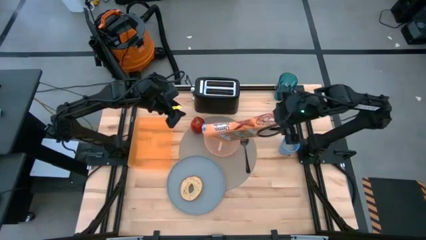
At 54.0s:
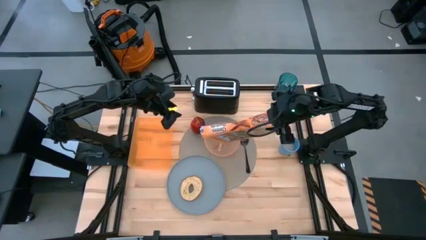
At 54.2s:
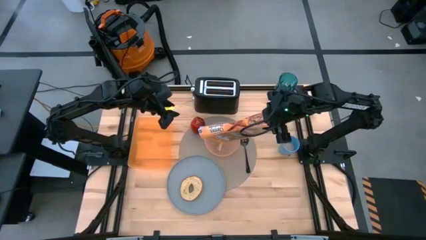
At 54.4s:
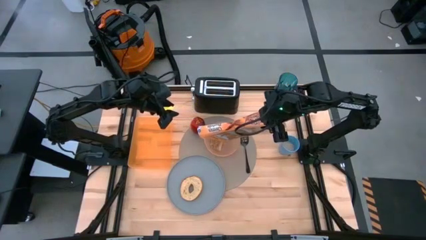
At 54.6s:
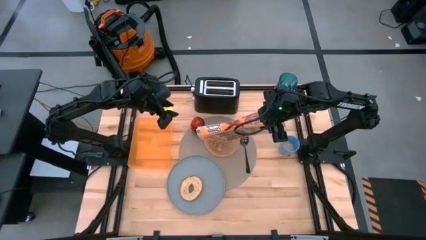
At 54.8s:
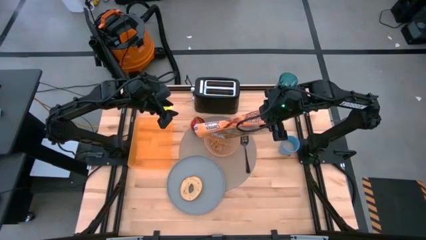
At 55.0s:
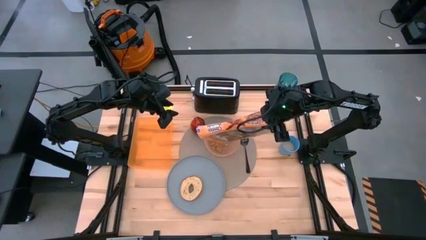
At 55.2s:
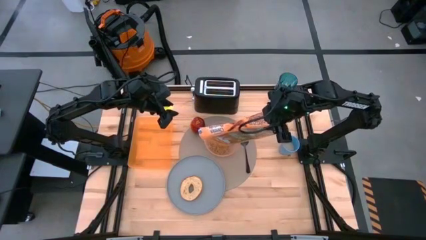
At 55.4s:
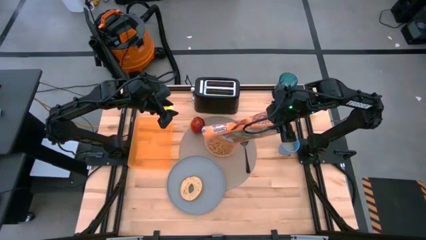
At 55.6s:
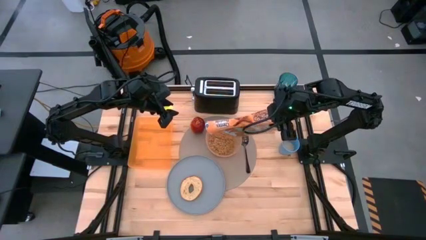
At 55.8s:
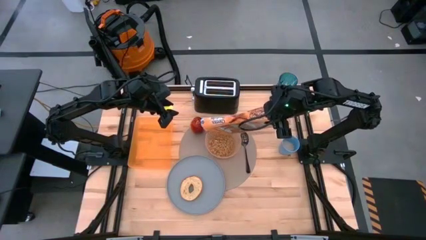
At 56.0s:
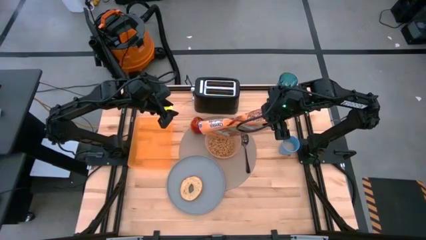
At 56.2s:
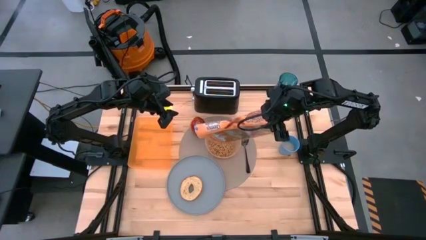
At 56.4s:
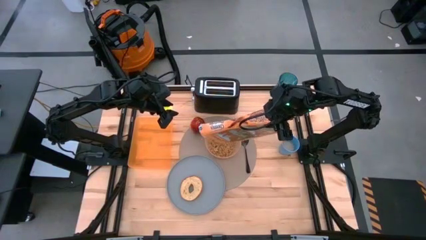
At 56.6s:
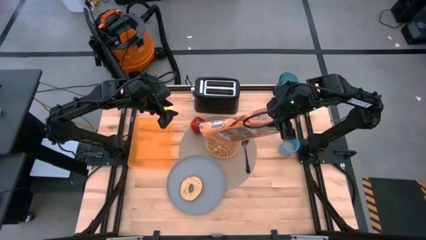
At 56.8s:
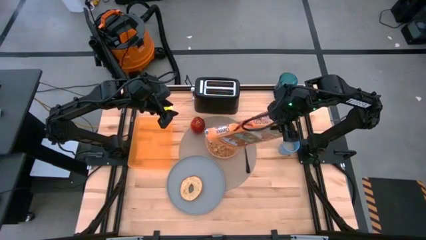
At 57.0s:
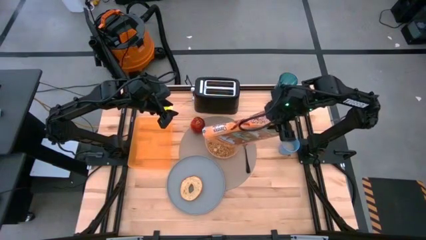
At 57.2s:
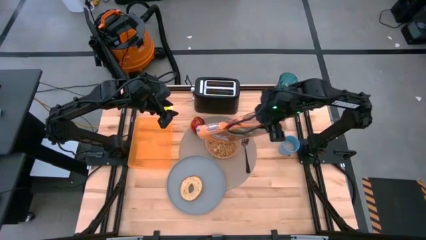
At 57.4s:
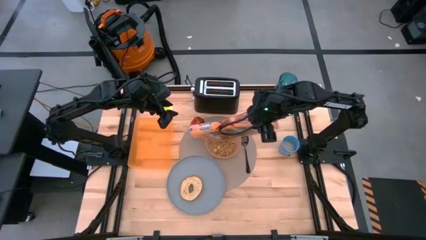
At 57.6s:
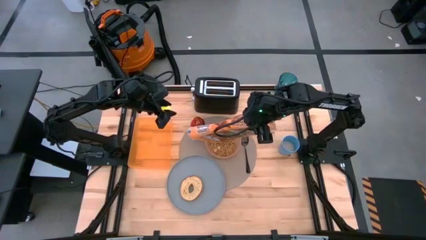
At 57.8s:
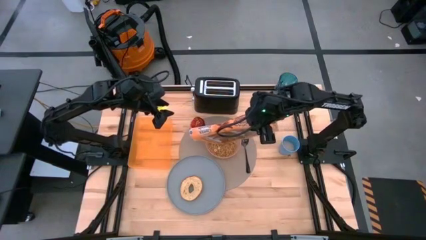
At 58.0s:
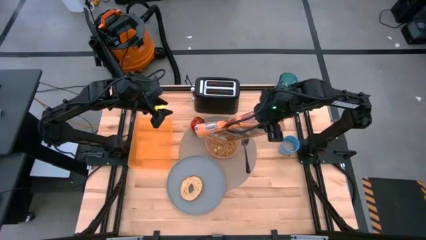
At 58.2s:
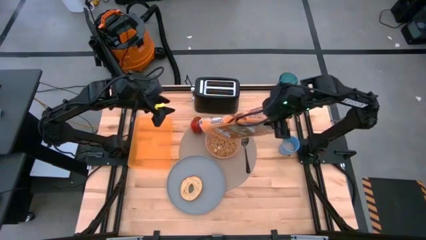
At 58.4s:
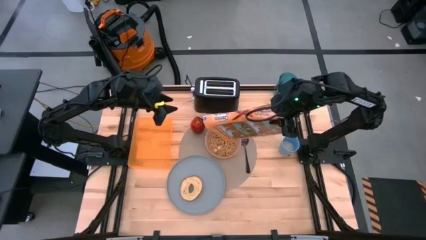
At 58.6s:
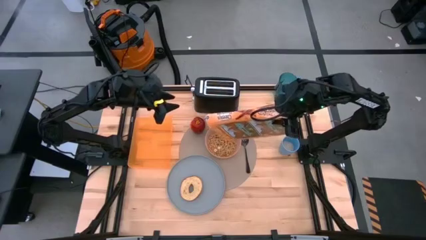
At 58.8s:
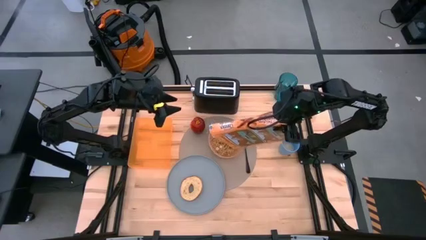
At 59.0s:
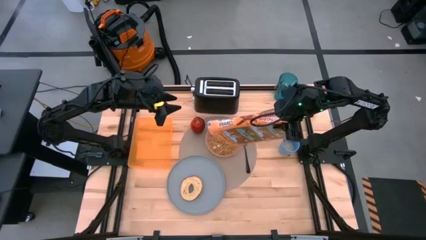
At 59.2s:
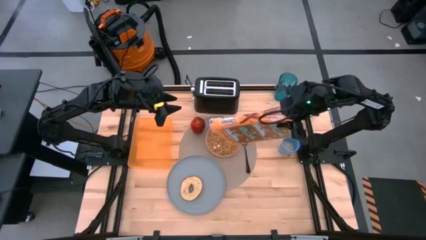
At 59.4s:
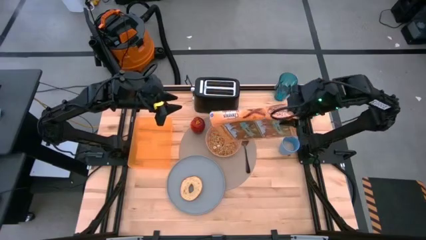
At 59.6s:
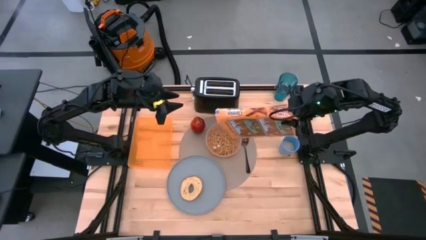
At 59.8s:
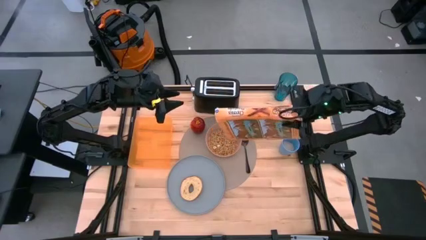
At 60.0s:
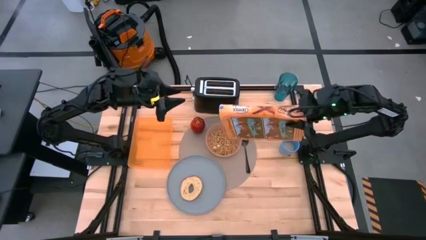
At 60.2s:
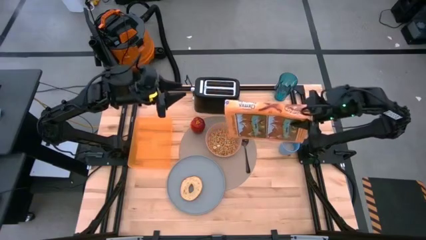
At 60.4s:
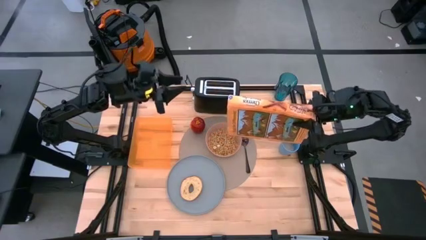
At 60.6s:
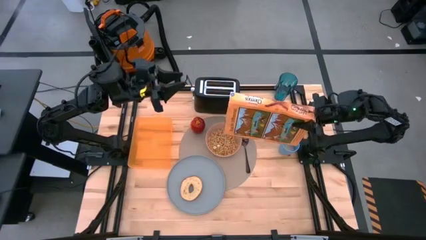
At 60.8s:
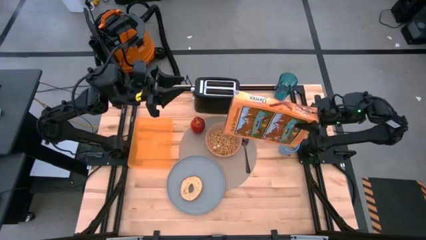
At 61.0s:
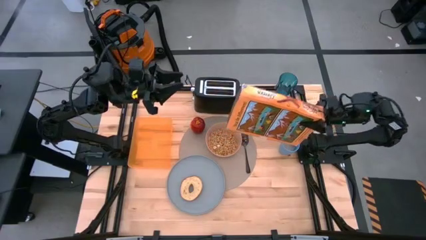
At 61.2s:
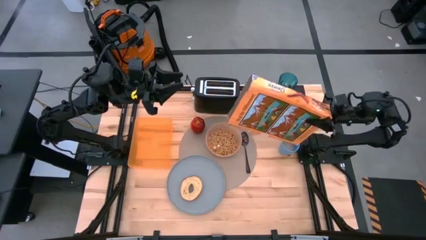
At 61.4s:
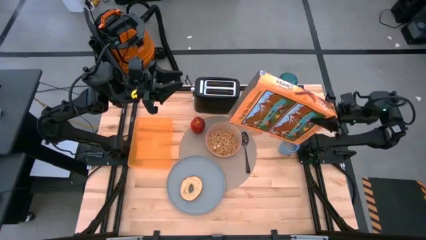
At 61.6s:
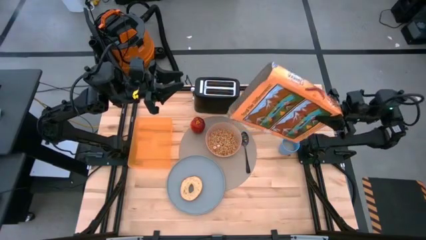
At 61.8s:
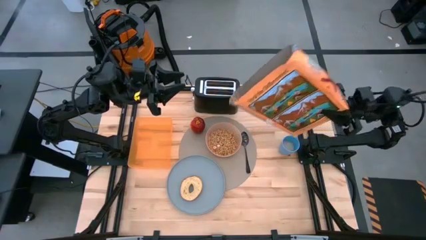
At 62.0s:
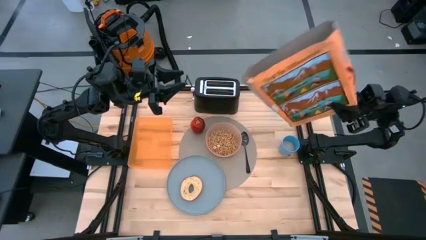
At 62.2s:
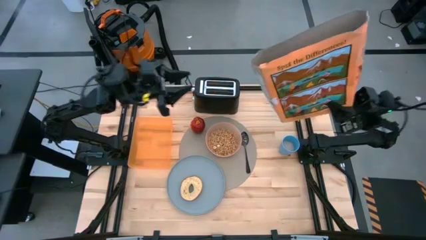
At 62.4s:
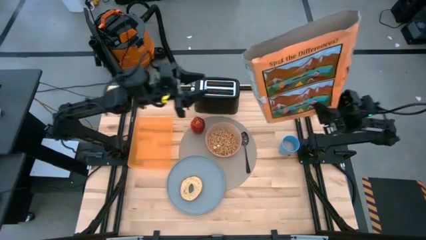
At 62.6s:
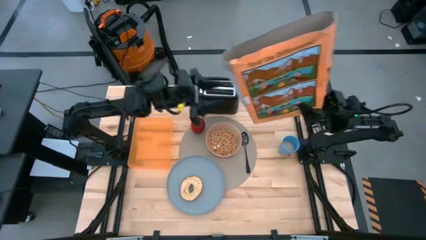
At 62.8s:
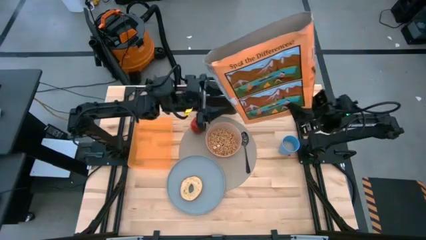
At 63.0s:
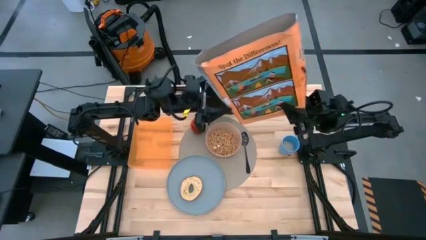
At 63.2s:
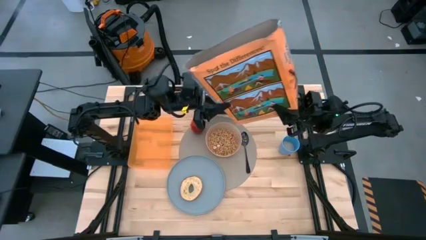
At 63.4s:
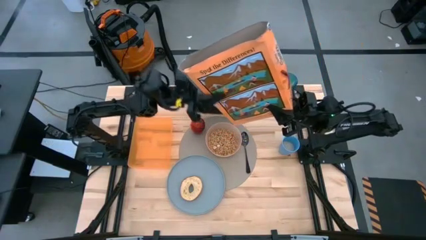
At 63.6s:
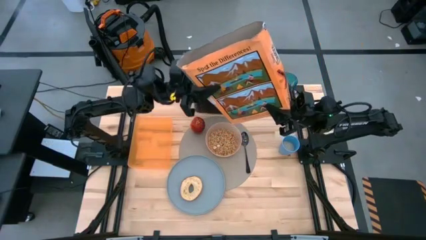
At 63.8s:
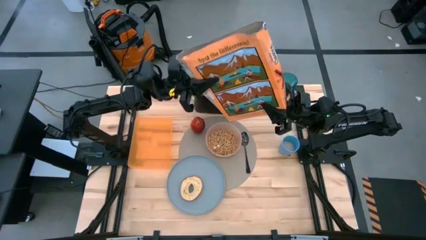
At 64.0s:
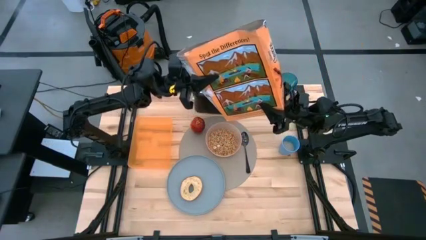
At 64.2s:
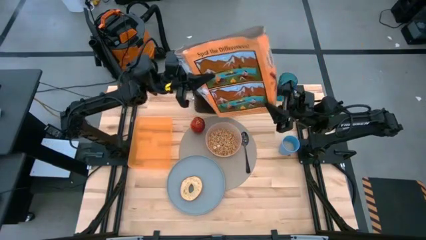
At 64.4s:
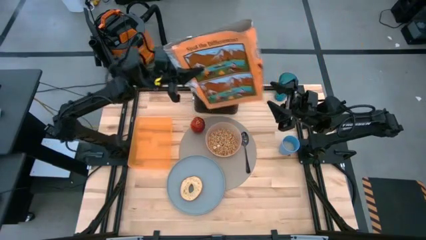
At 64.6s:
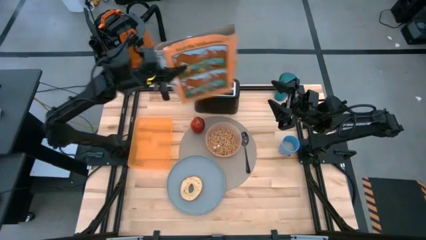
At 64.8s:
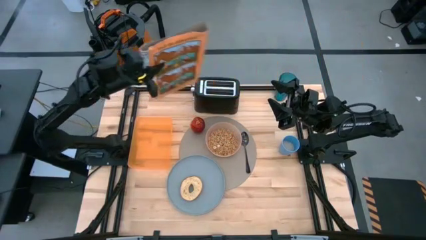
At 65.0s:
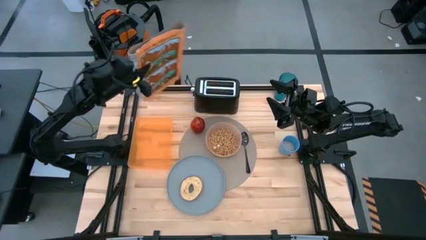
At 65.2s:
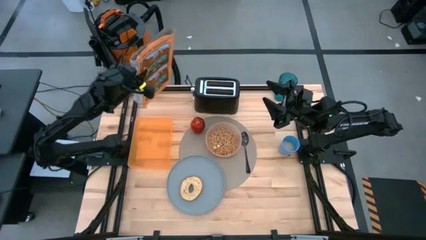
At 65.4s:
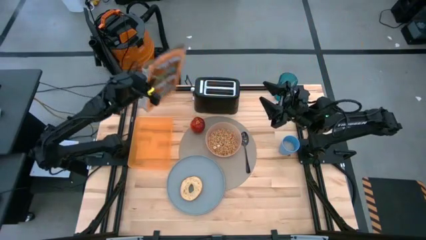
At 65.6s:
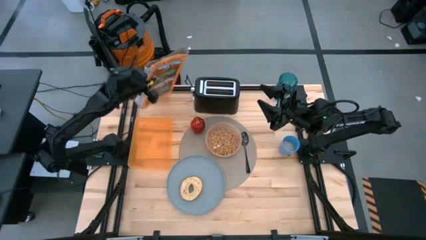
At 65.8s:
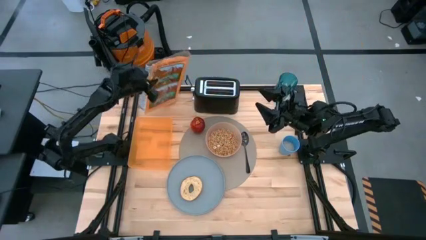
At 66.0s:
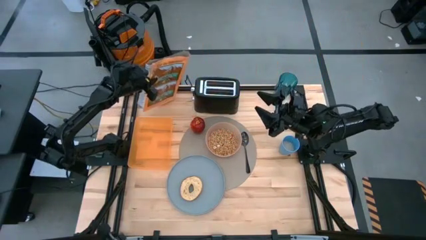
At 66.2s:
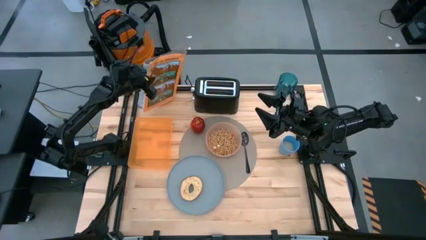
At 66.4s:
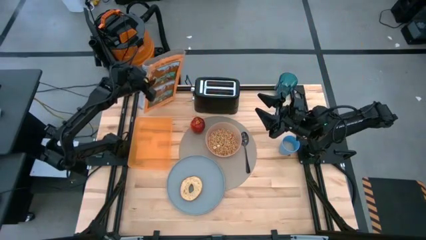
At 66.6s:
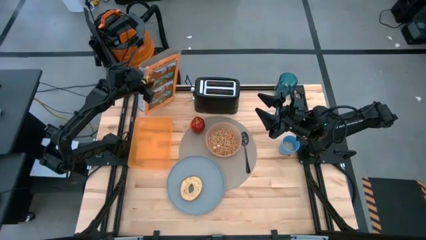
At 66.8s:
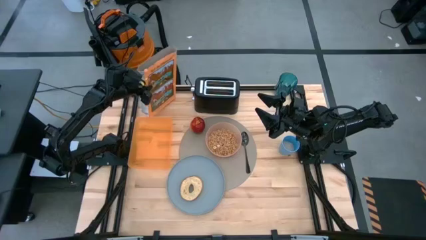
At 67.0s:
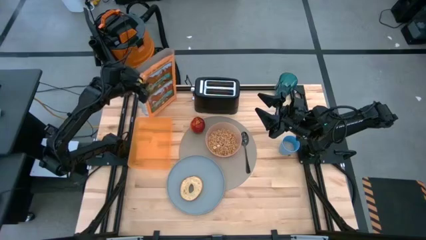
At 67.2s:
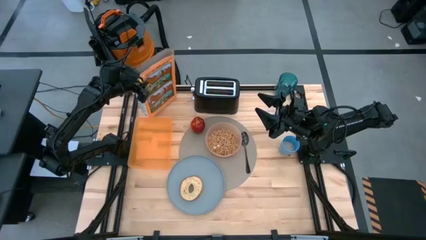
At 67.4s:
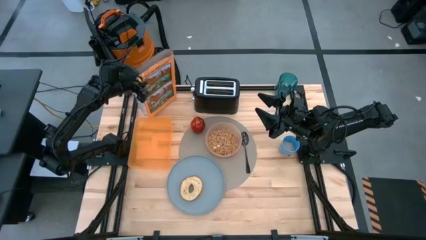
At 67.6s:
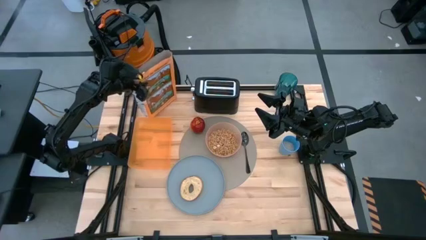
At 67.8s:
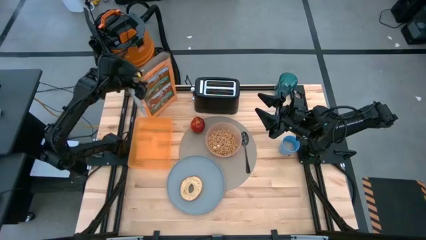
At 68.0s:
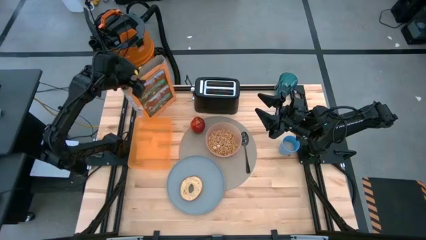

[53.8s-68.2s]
Task: Arrange a breakfast setting
Pour the cereal from the cereal box into the orange bowl

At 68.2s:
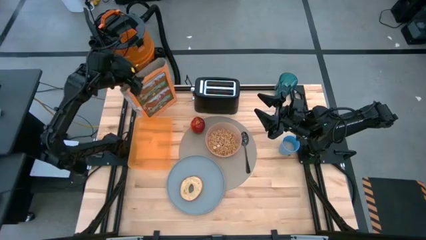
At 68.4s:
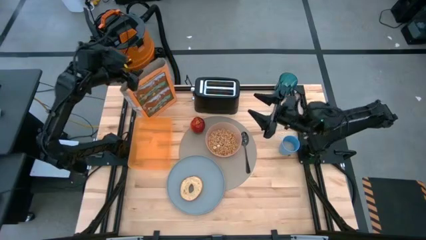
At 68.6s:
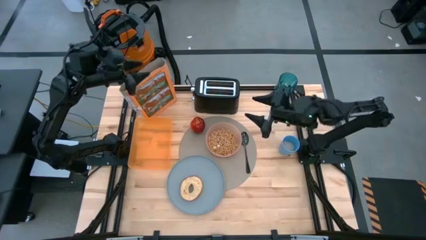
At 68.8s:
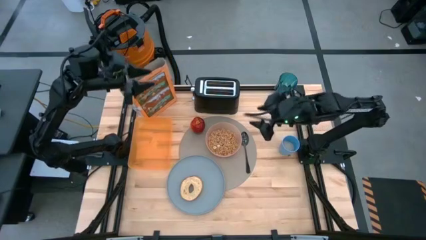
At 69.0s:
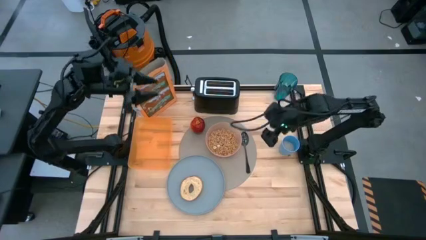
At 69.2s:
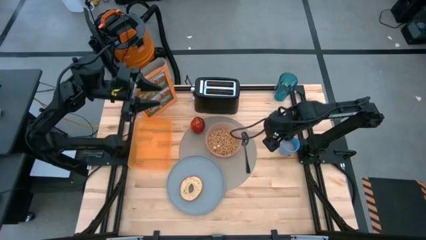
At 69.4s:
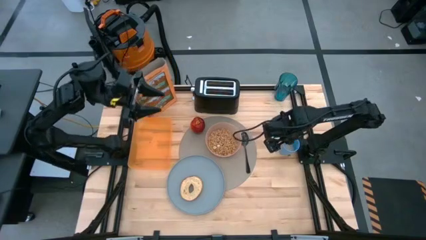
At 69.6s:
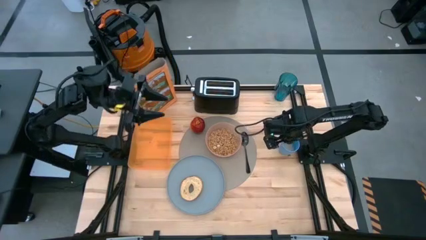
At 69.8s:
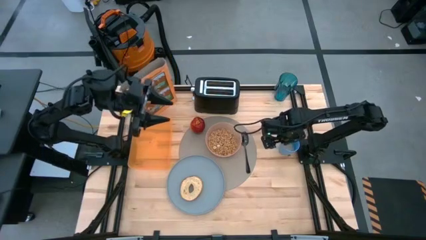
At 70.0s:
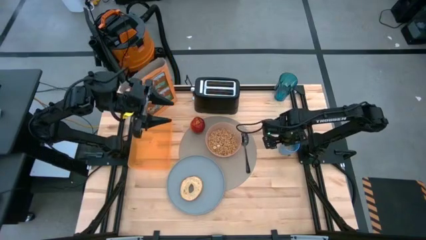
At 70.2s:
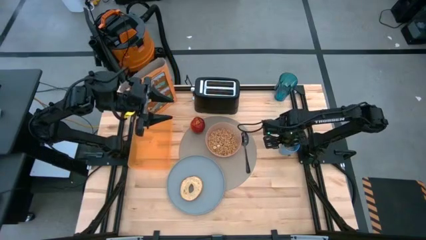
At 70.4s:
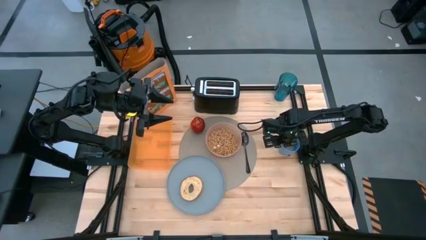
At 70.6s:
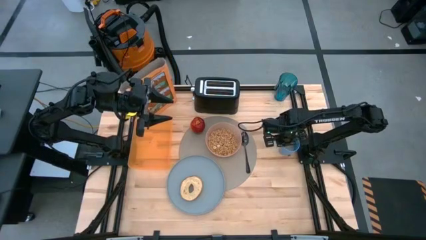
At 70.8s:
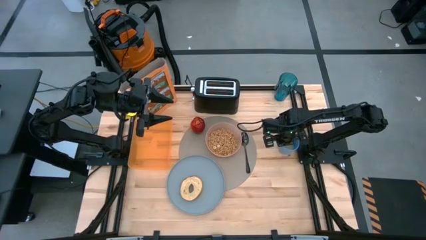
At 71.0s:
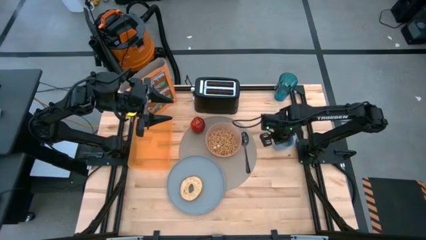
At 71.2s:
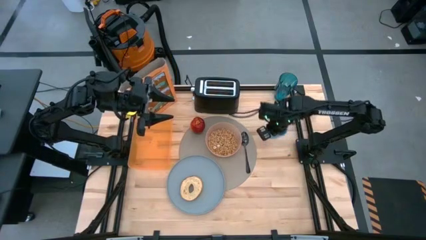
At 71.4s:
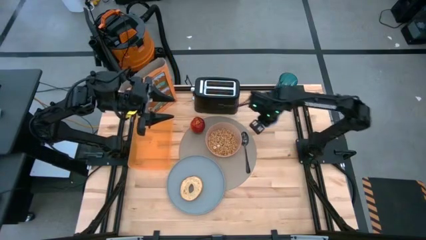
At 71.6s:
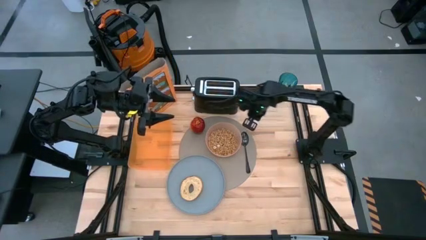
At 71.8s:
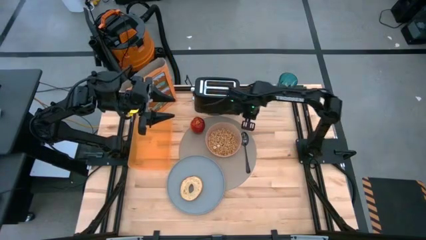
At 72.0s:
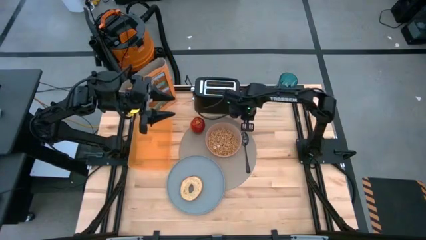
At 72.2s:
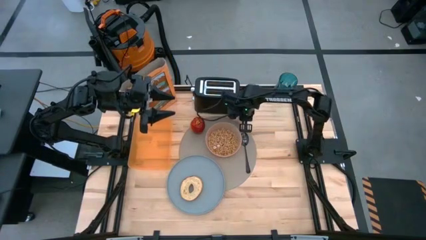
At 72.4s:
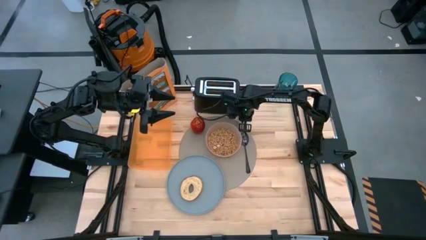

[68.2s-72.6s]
Put the blue cup to the top right of the gray table mat
